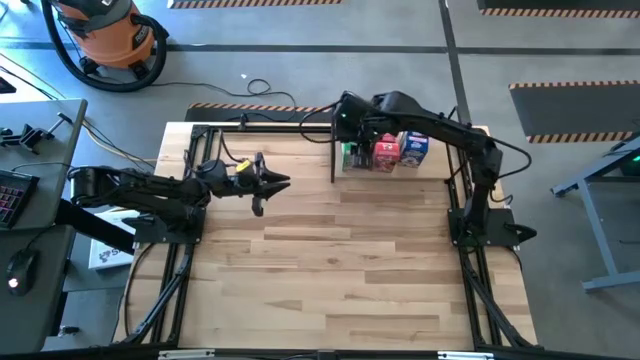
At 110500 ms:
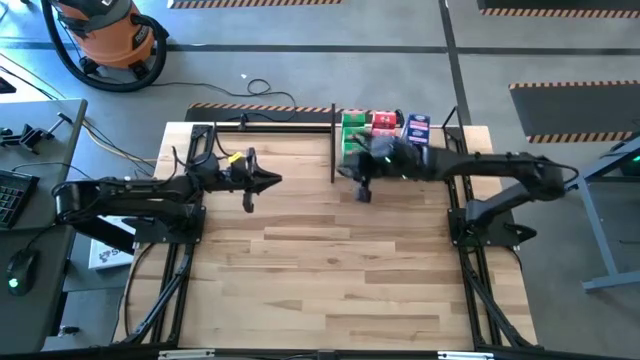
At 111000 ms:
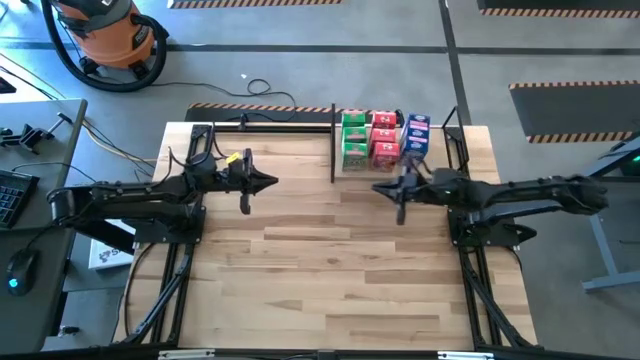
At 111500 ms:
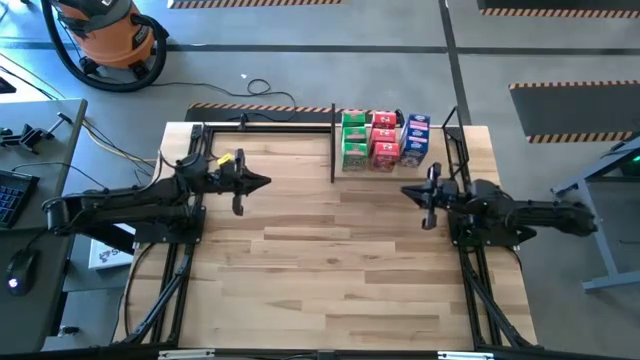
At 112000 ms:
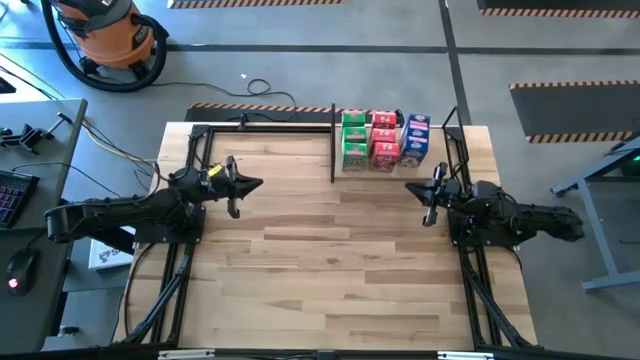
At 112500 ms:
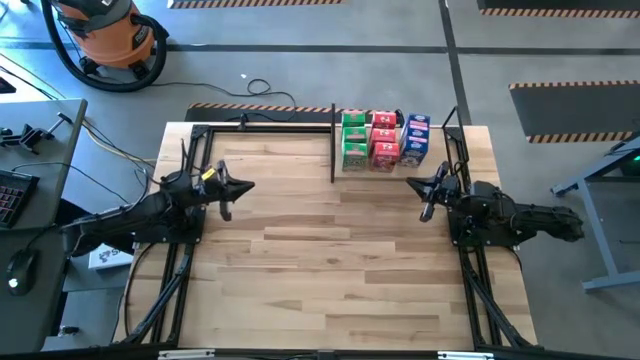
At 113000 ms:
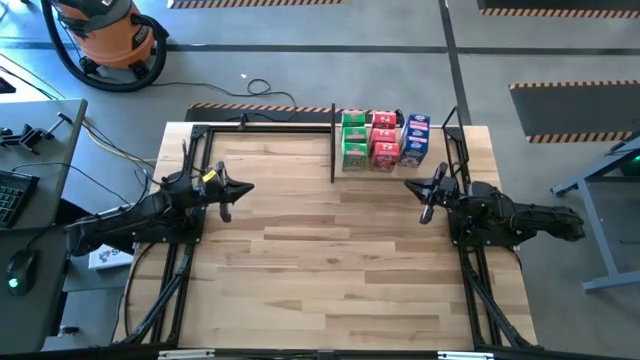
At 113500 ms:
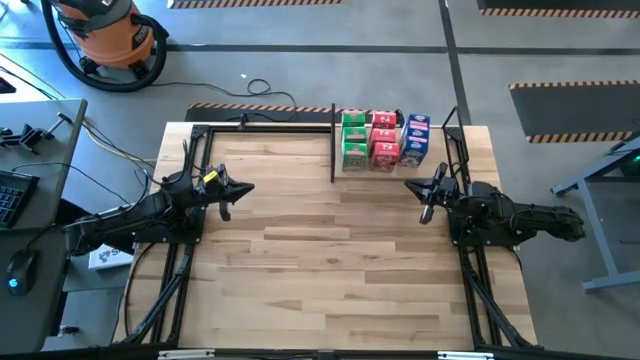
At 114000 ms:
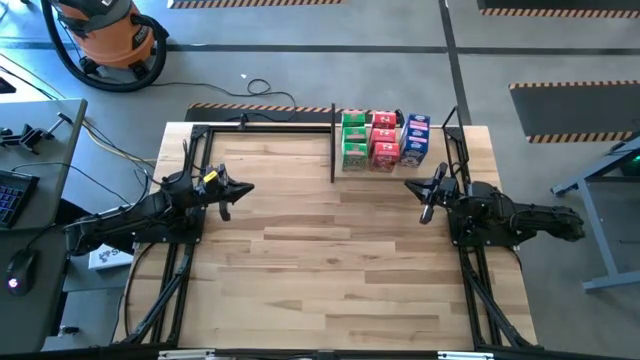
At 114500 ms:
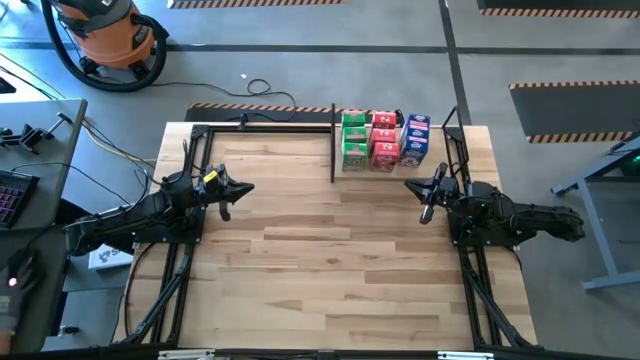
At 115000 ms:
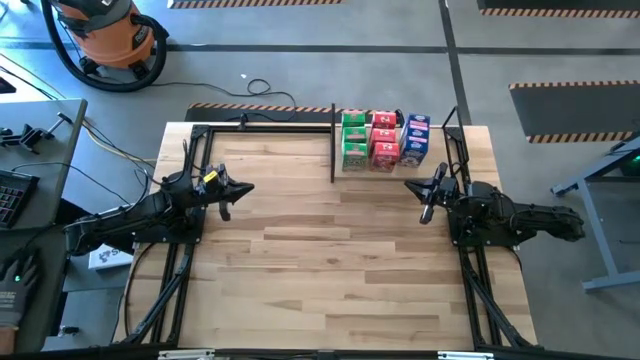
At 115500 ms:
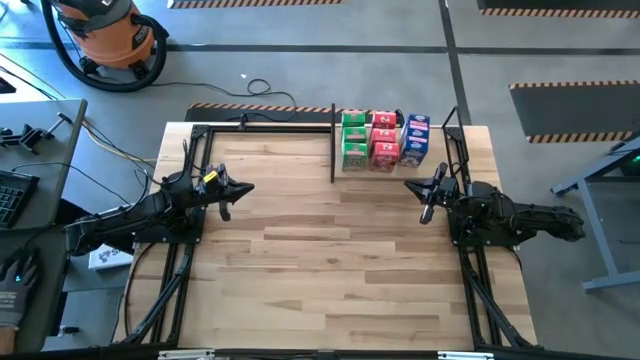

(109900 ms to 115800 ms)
Task: Stack cereal on shelf
Return to Home Position

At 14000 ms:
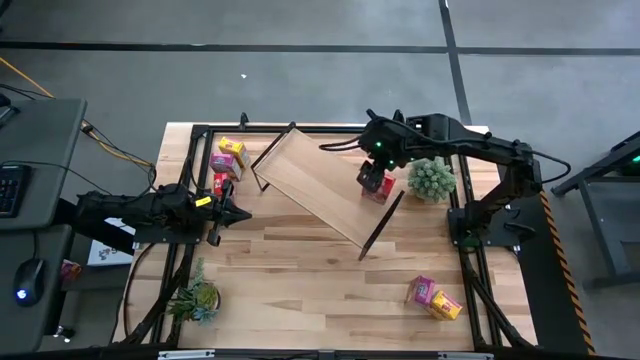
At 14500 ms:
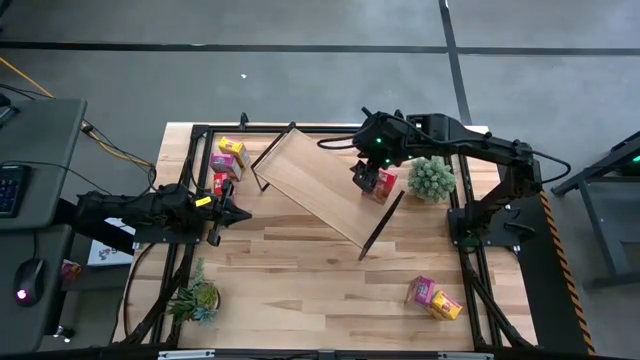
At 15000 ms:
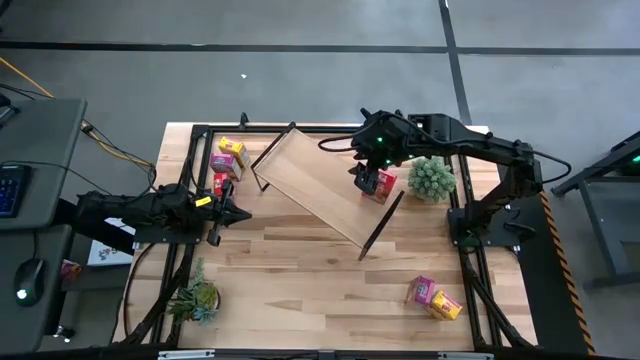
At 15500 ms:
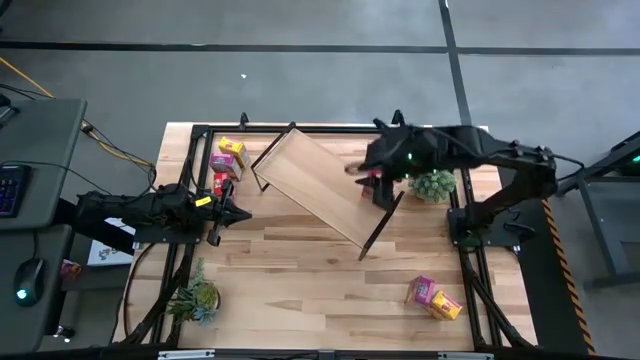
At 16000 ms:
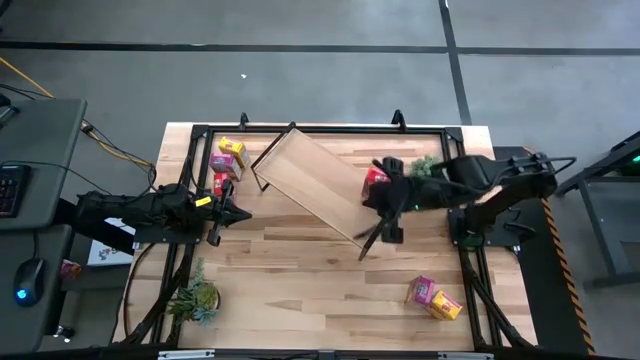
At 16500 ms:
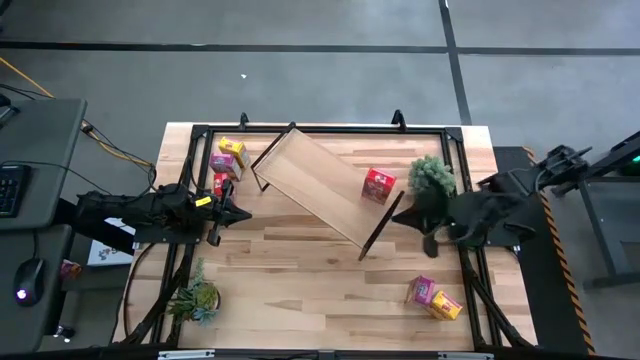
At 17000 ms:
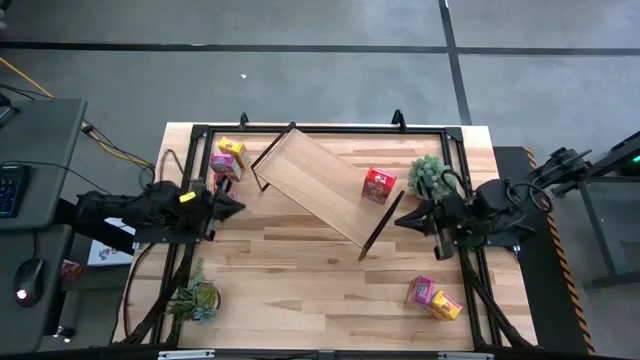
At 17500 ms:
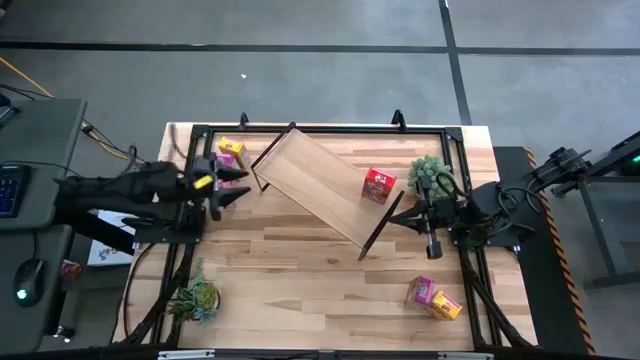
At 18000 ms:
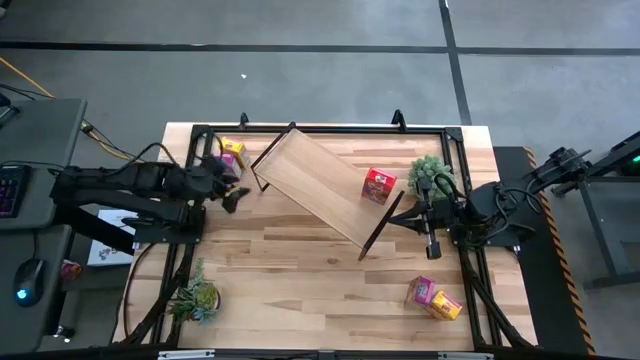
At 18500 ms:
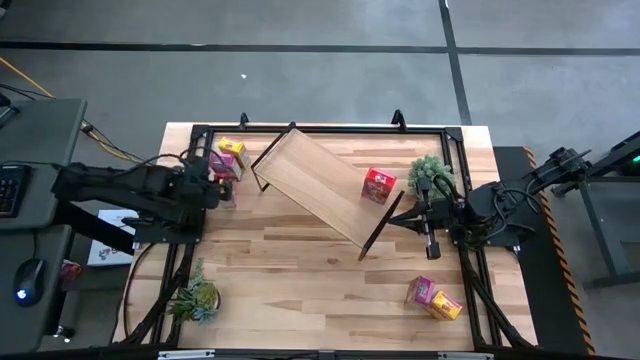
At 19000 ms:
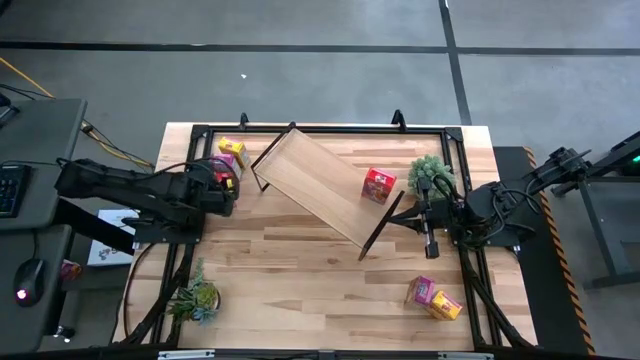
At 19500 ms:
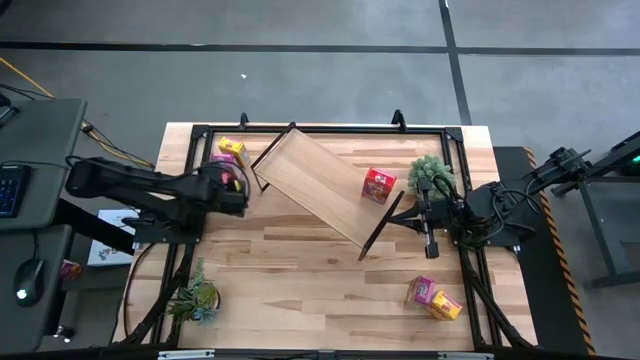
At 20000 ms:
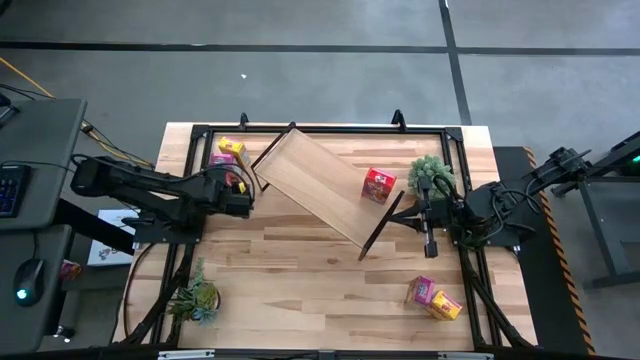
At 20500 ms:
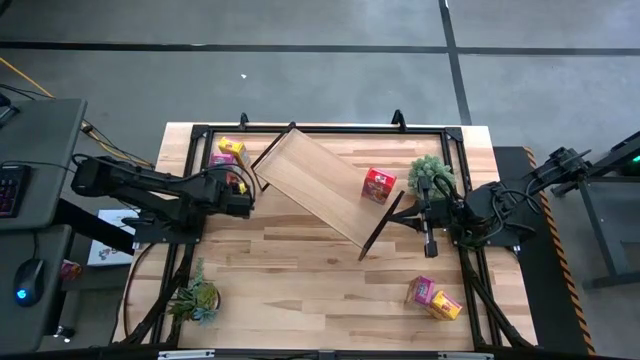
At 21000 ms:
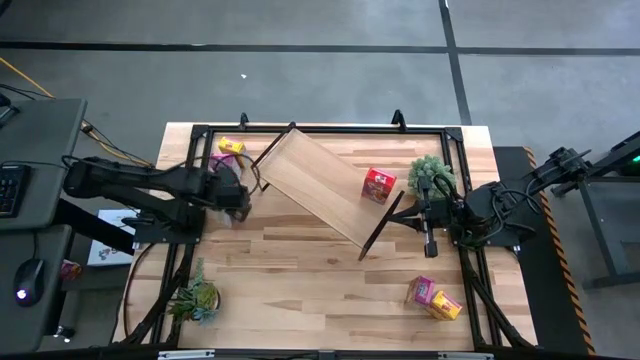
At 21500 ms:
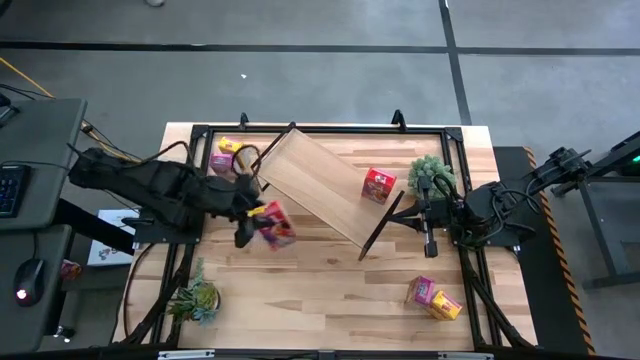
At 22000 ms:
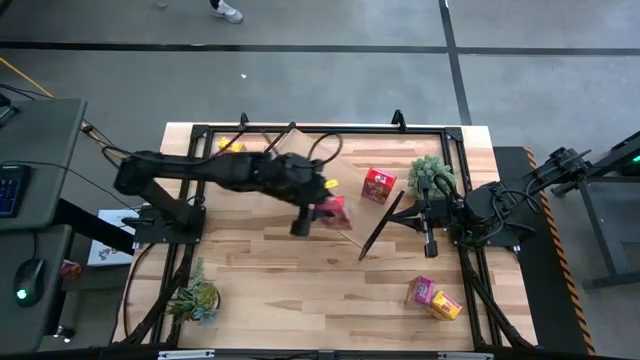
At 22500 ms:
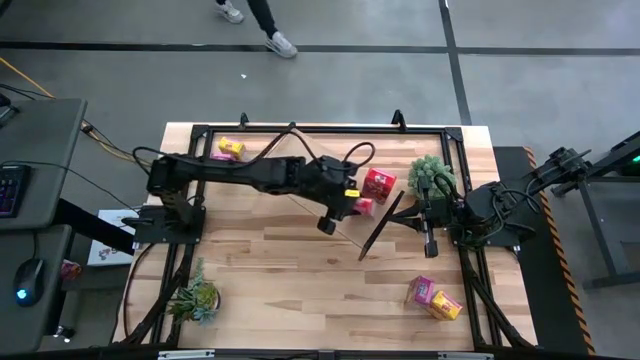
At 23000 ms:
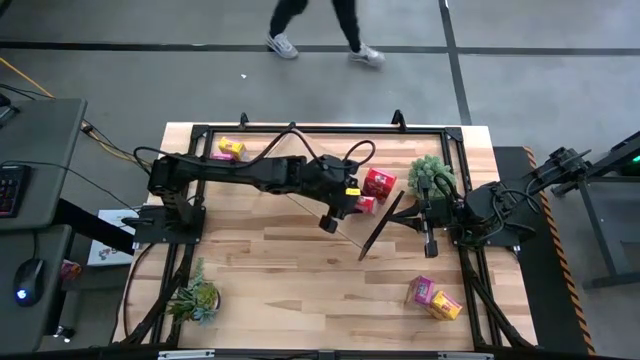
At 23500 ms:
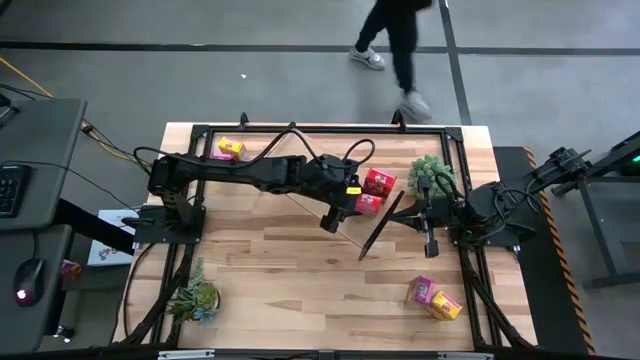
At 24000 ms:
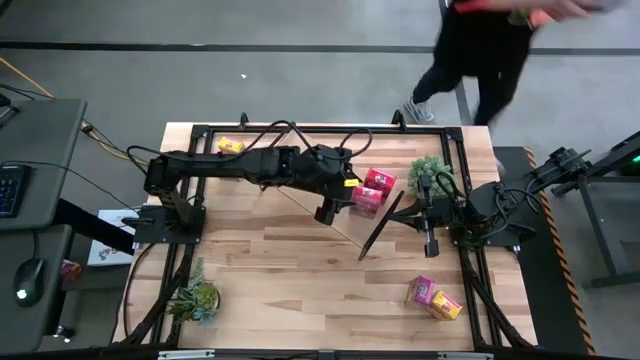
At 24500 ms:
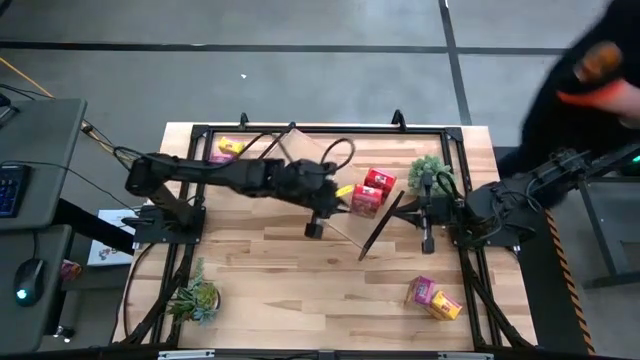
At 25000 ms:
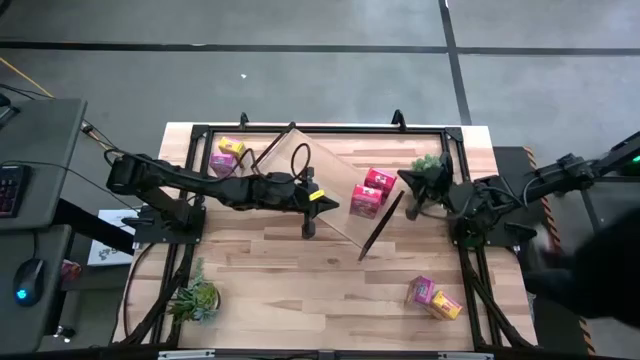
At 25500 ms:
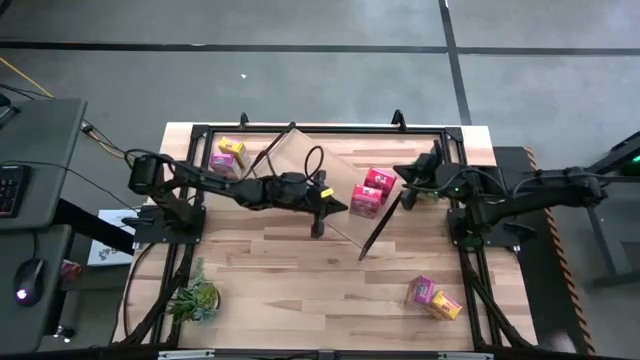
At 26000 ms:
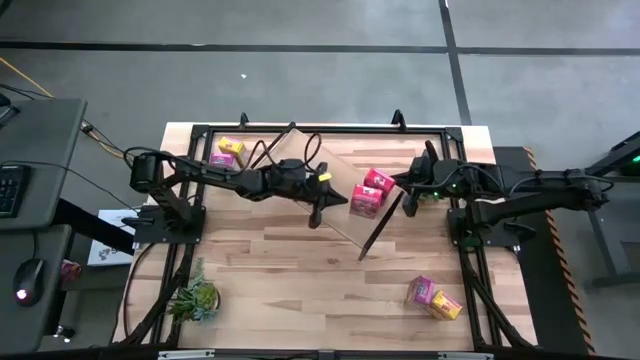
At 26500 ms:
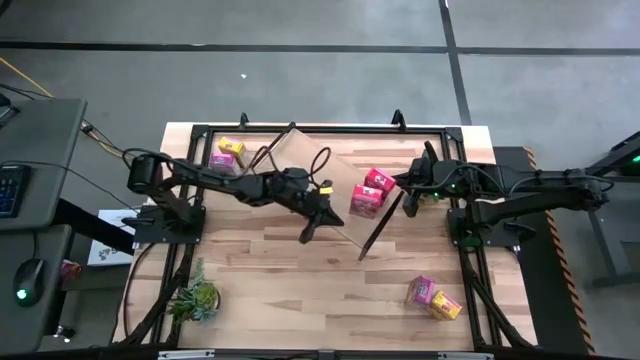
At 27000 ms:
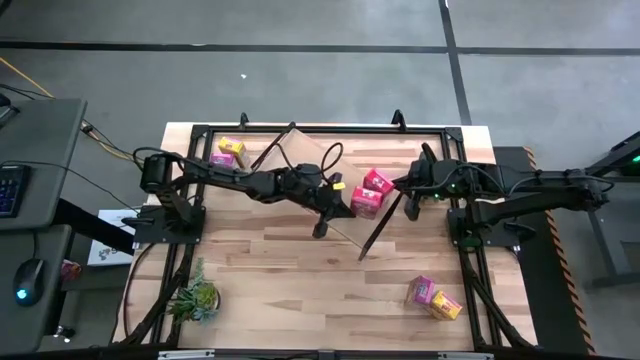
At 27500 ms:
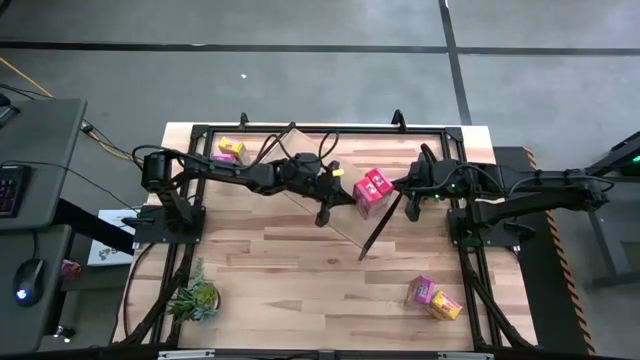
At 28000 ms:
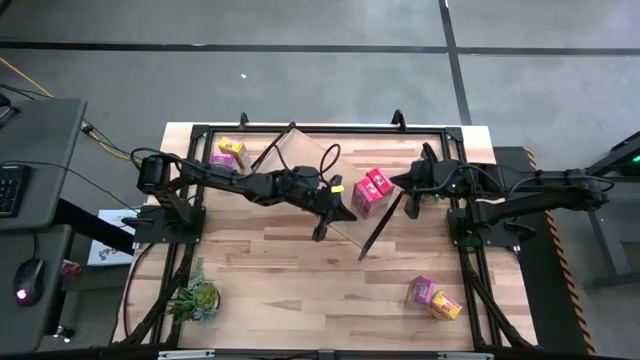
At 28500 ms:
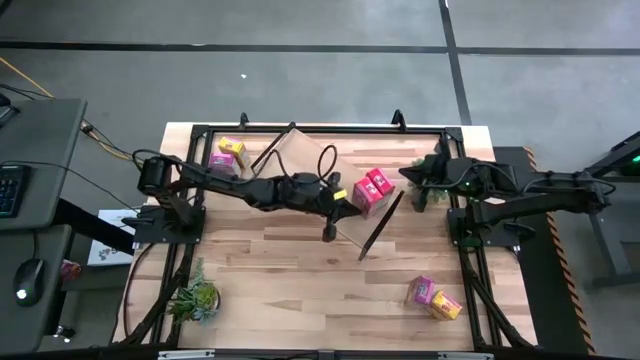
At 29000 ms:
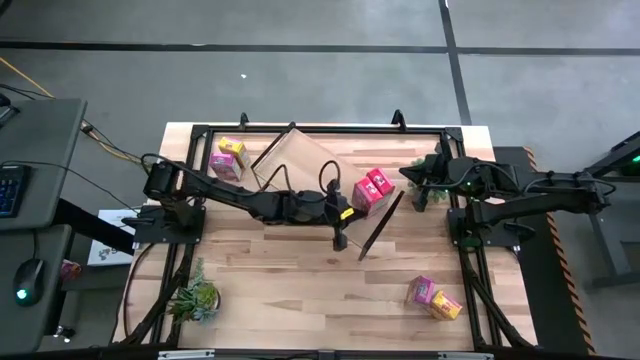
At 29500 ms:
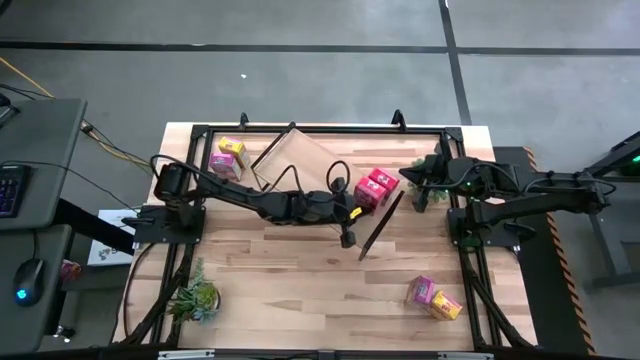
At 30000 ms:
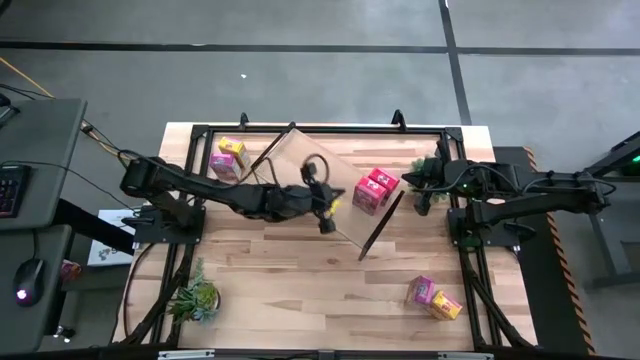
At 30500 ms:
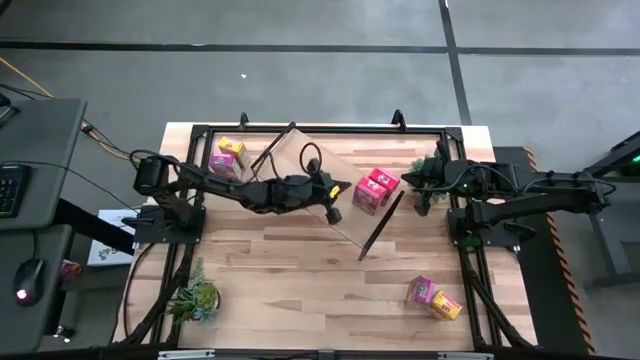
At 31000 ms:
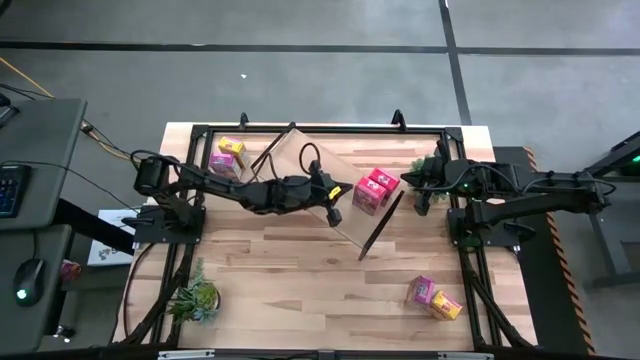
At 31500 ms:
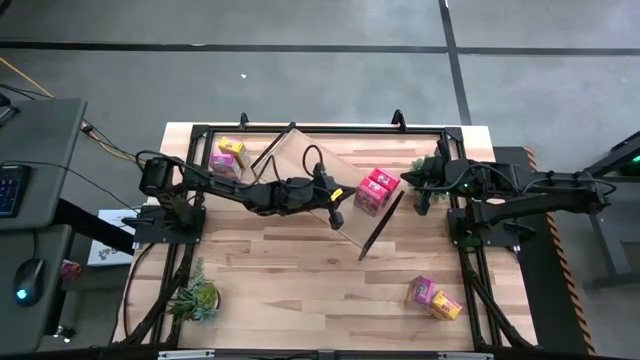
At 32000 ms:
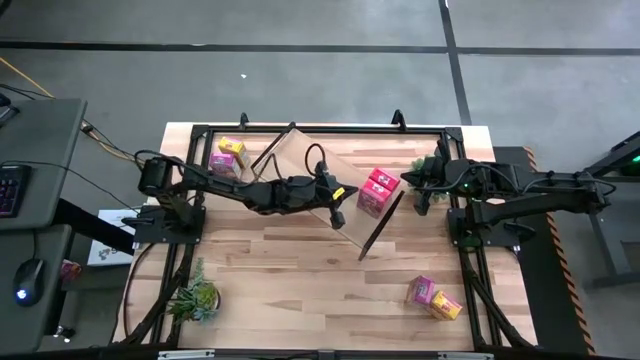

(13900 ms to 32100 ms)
Task: Stack cereal on shelf
Put the red cereal box on the shelf
